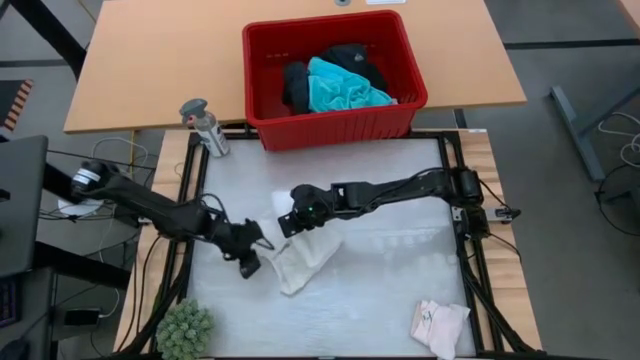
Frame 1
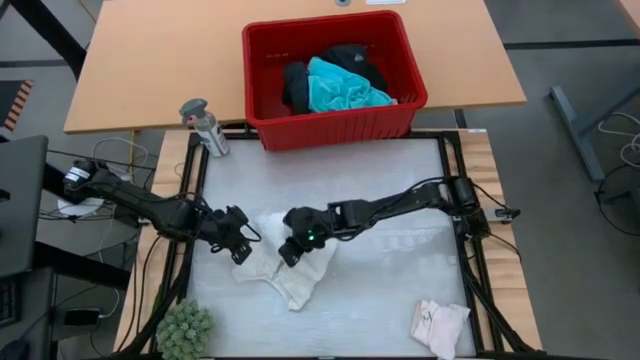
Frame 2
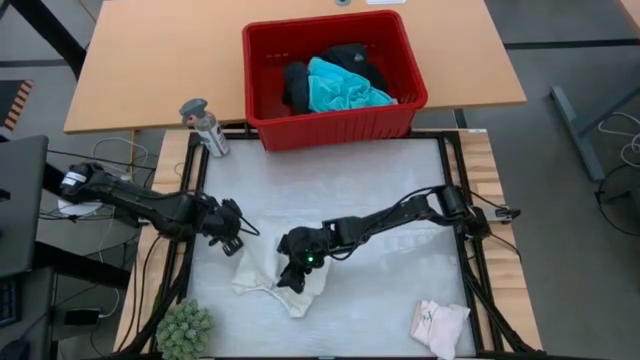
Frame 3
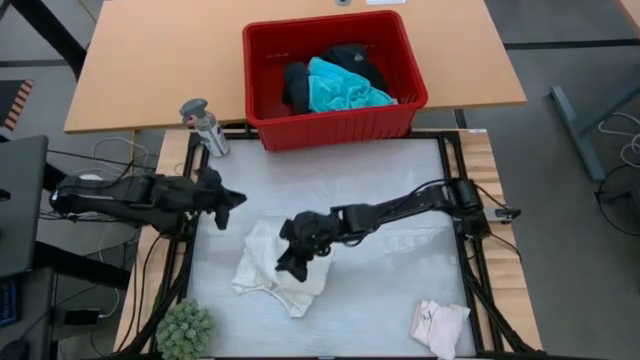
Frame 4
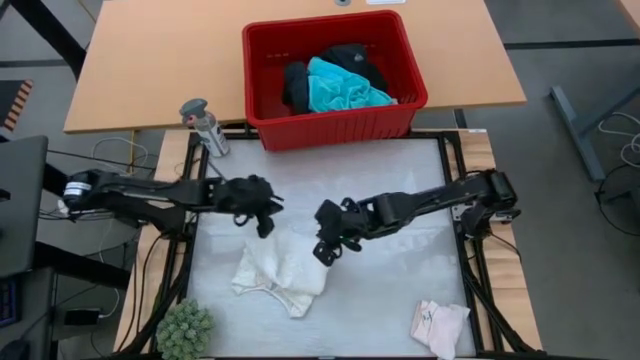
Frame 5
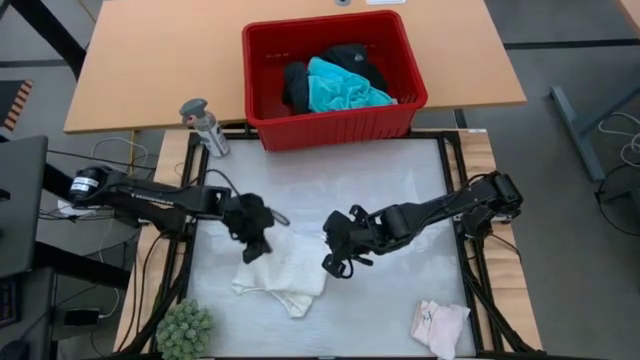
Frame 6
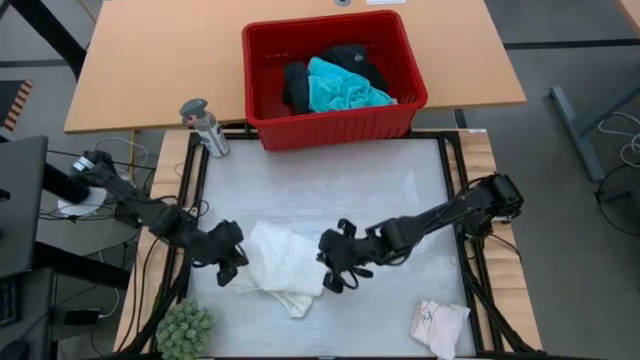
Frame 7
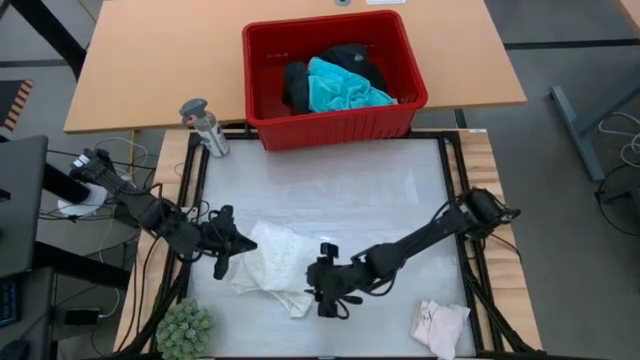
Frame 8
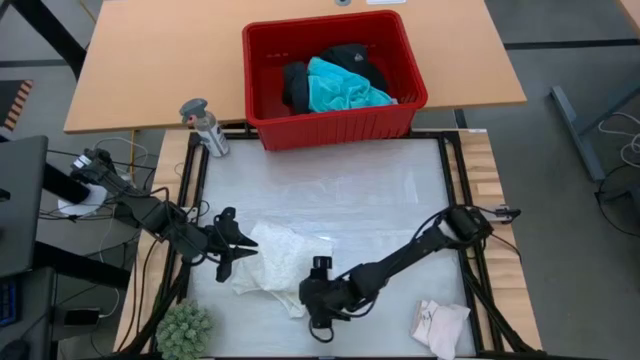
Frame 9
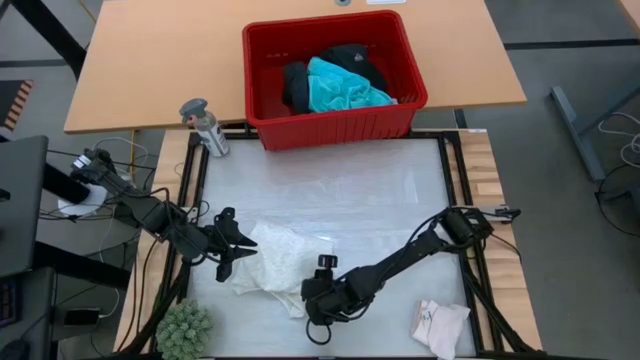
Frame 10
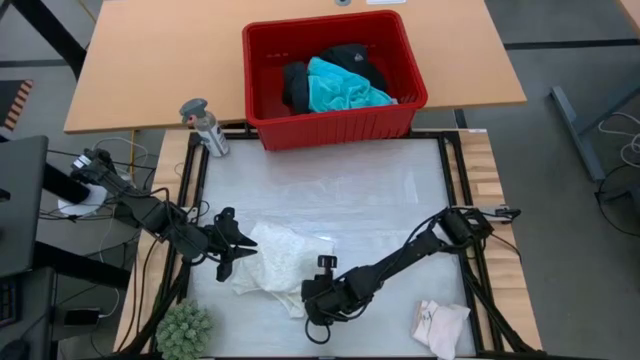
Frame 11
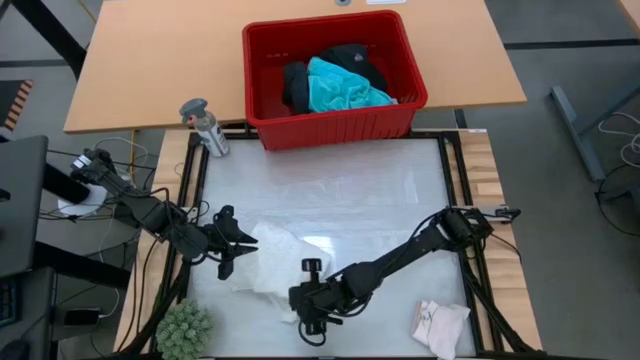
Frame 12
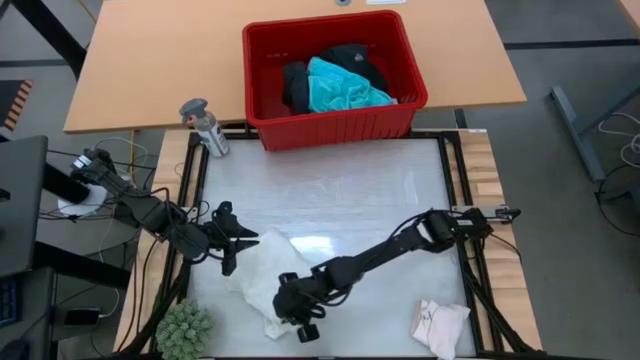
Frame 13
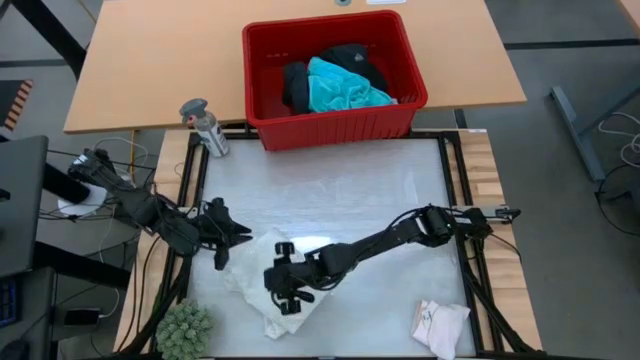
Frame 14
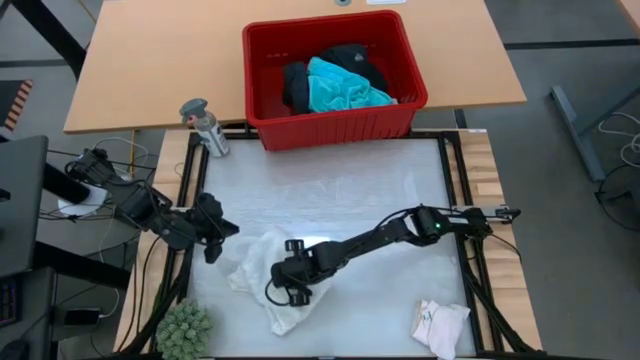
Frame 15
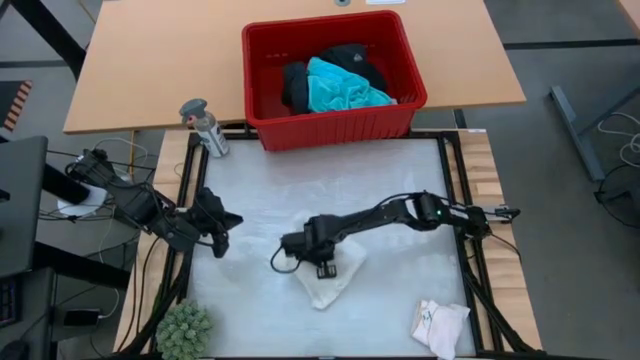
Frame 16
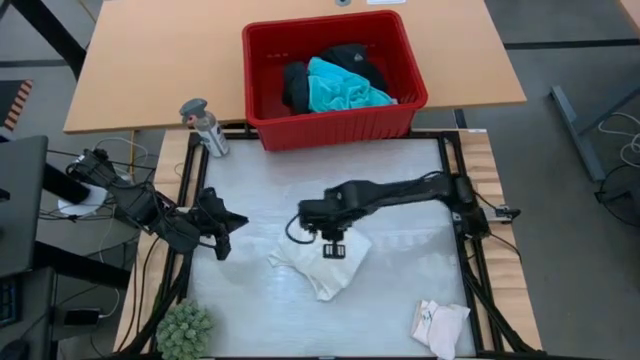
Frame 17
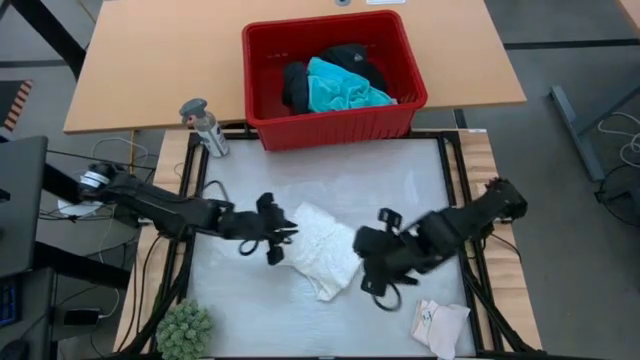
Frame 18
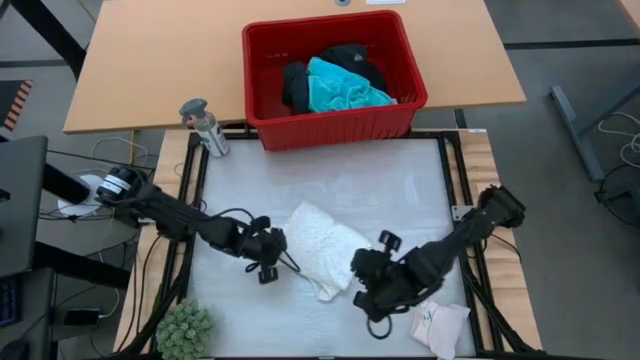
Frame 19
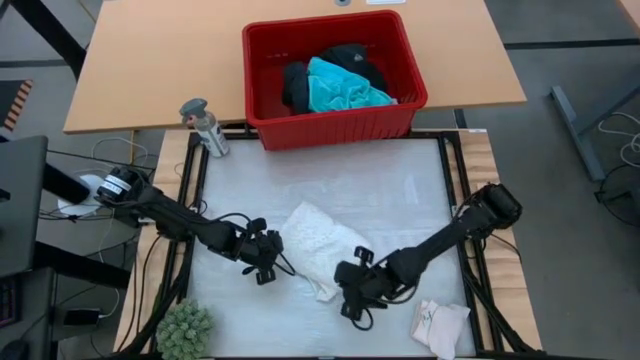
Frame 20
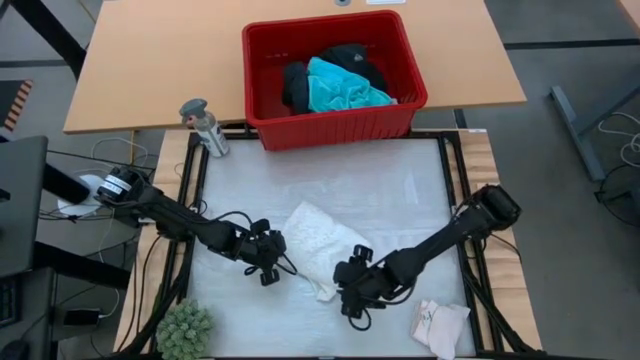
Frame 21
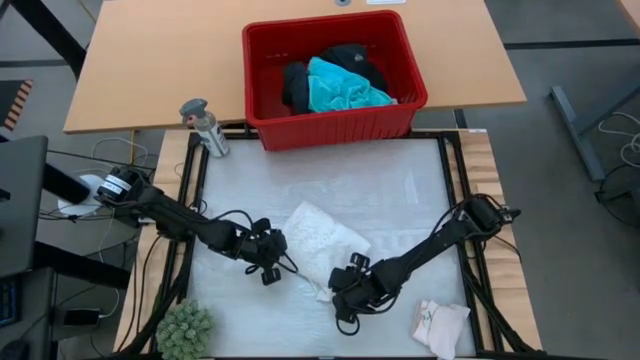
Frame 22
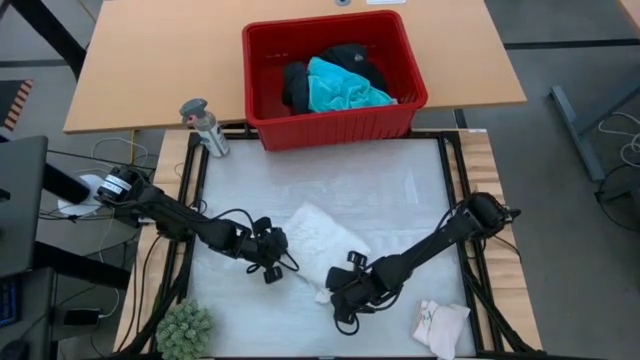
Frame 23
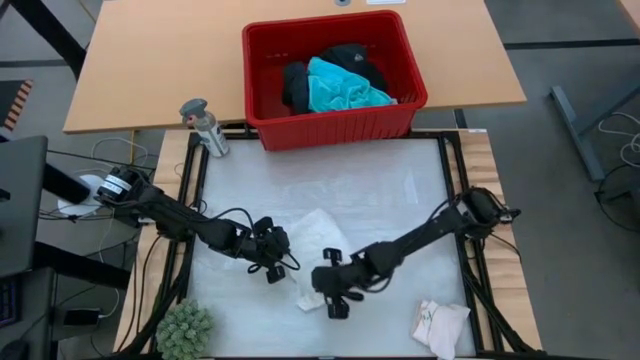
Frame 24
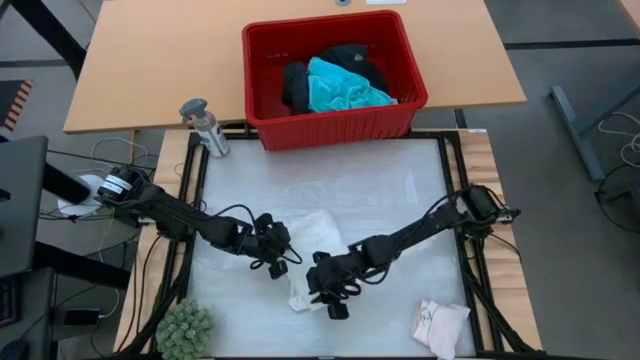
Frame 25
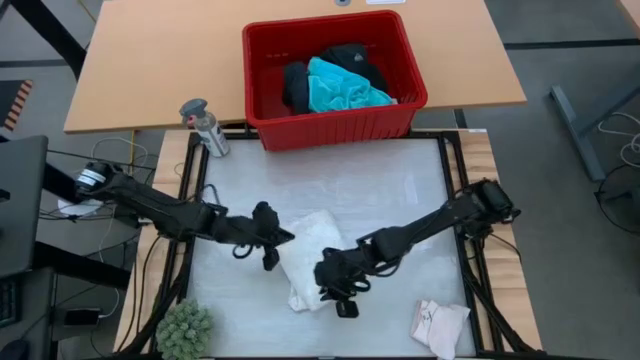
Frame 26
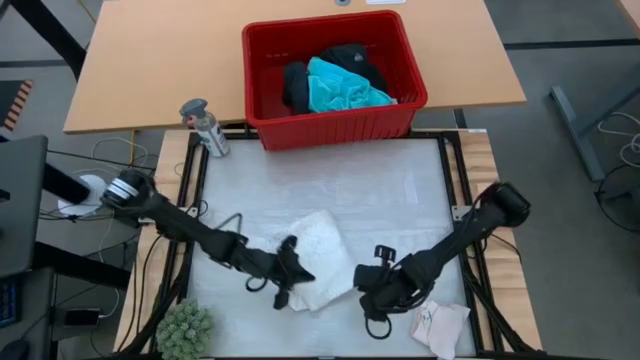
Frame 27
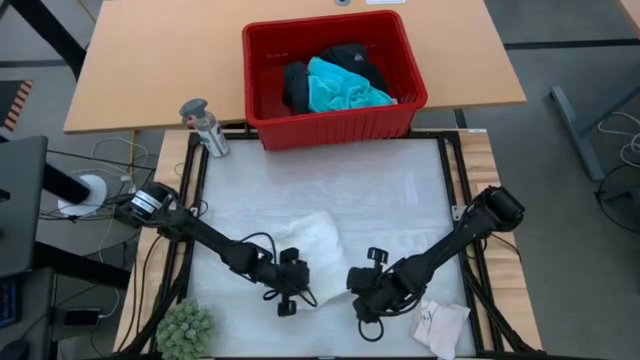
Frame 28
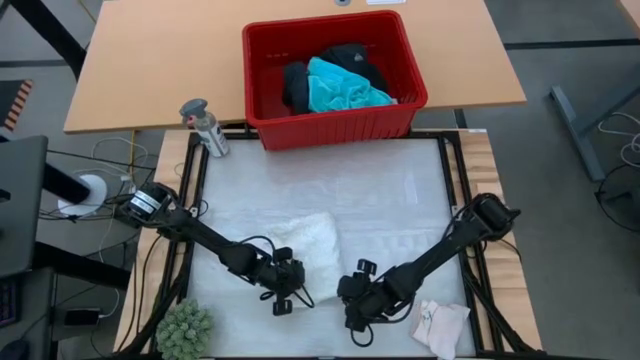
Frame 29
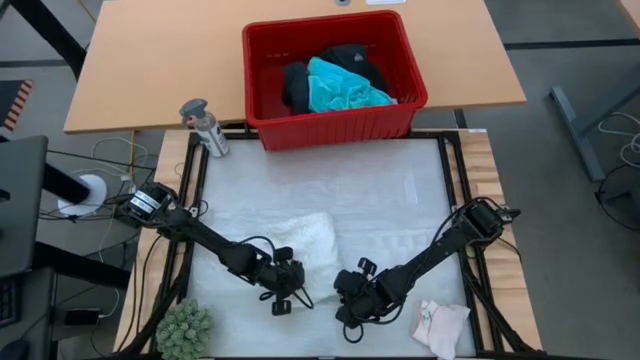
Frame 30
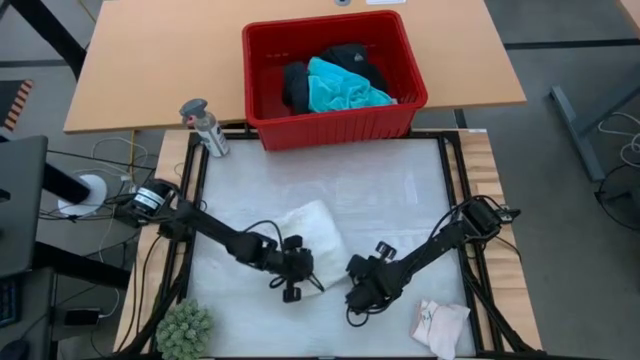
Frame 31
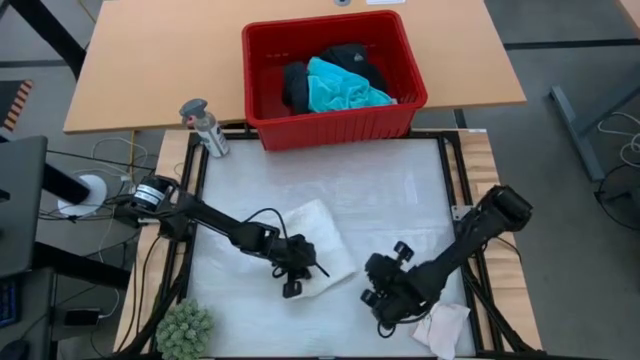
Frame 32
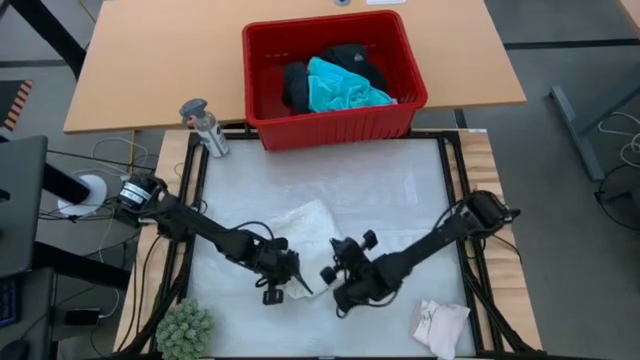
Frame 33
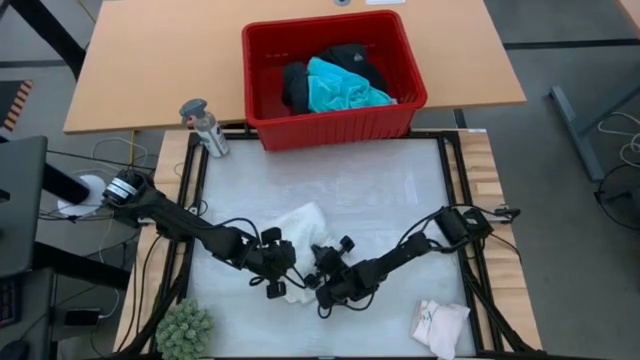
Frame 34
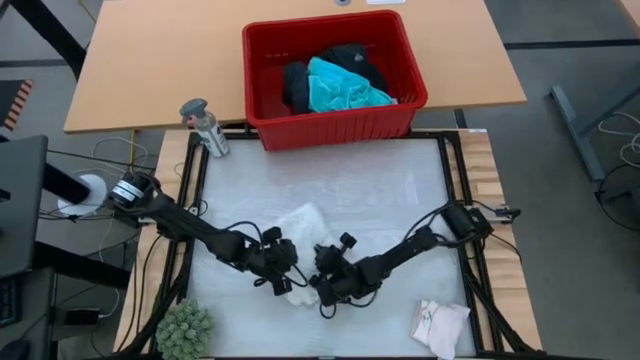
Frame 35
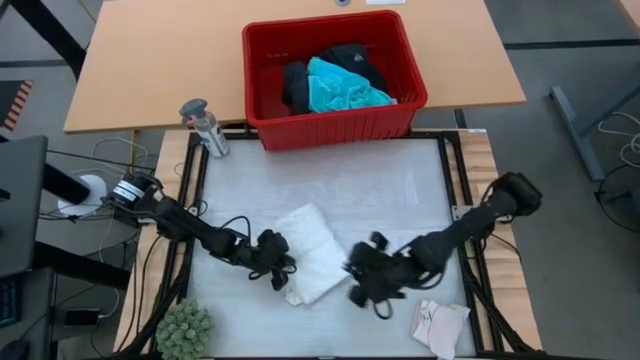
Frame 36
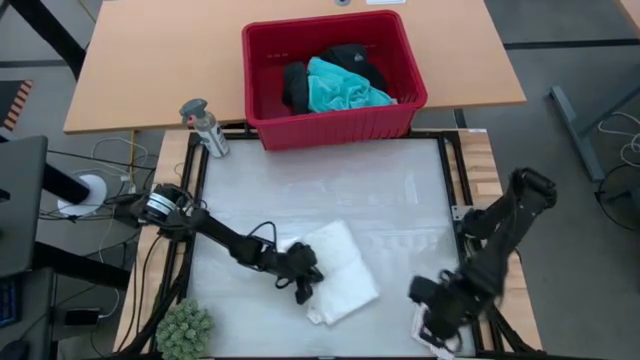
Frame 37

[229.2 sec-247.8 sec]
Task: Fold Laundry from Bin
Fold the white blouse
